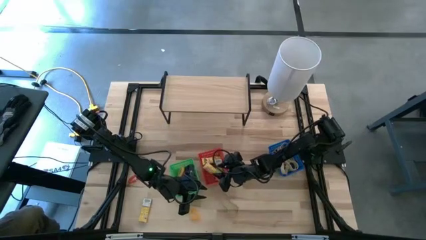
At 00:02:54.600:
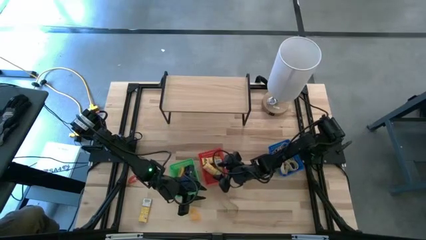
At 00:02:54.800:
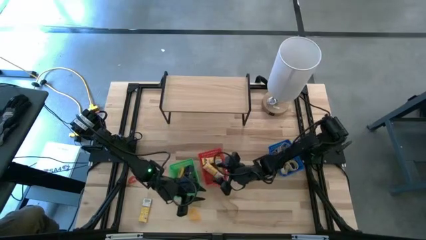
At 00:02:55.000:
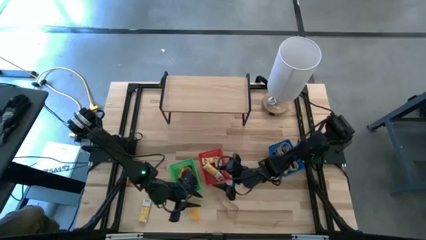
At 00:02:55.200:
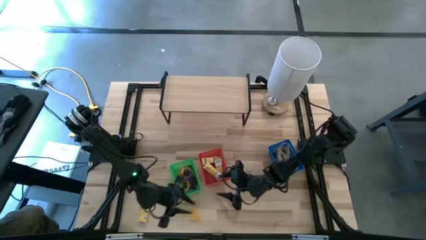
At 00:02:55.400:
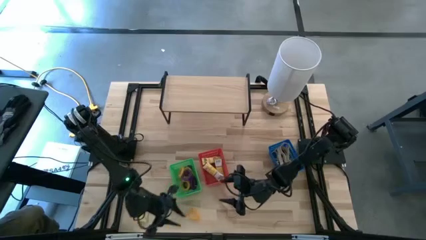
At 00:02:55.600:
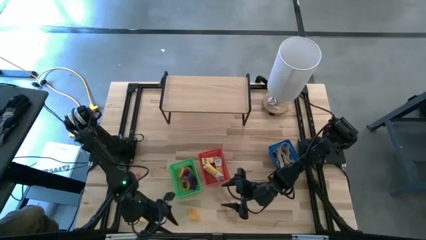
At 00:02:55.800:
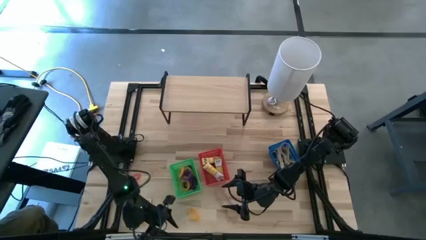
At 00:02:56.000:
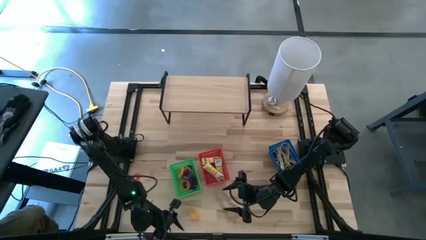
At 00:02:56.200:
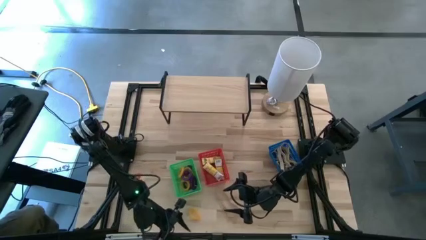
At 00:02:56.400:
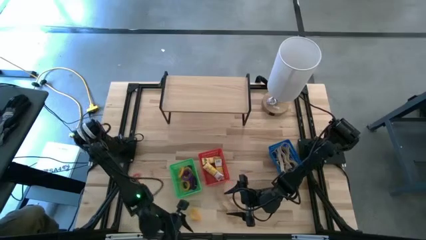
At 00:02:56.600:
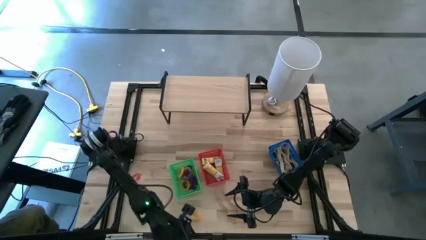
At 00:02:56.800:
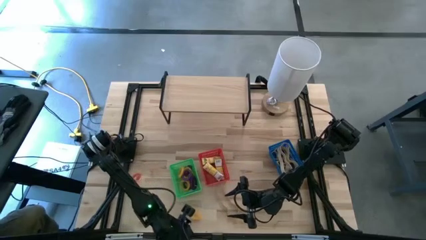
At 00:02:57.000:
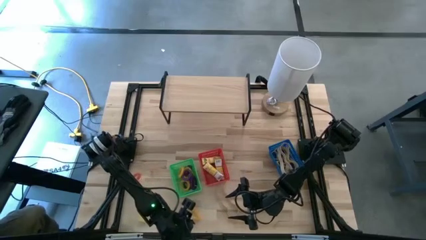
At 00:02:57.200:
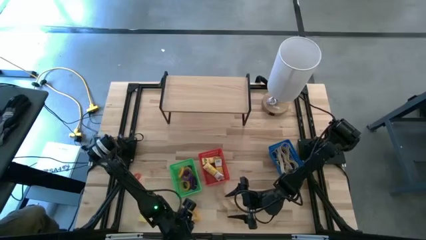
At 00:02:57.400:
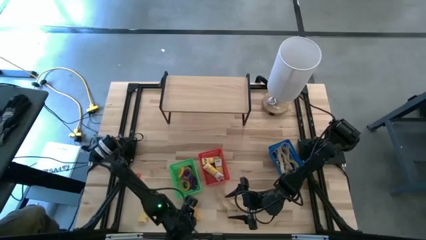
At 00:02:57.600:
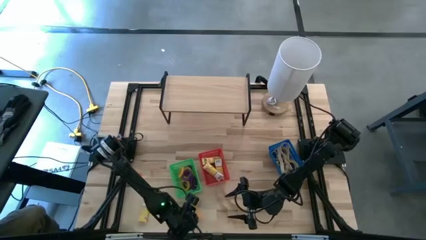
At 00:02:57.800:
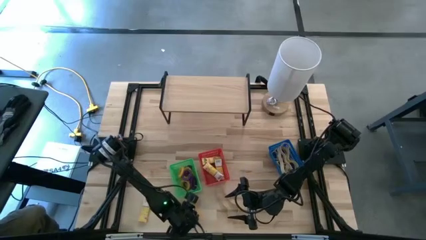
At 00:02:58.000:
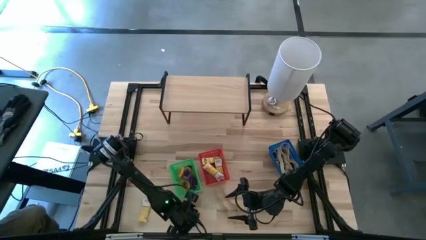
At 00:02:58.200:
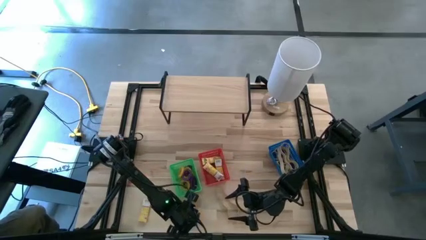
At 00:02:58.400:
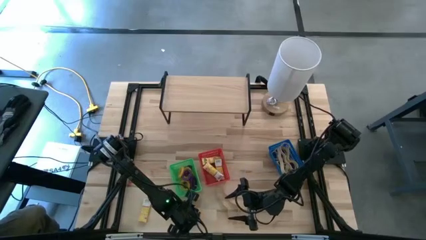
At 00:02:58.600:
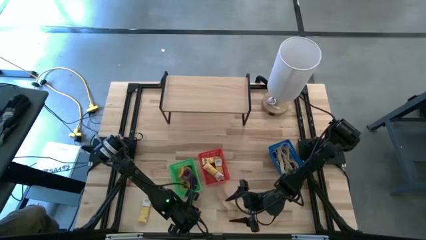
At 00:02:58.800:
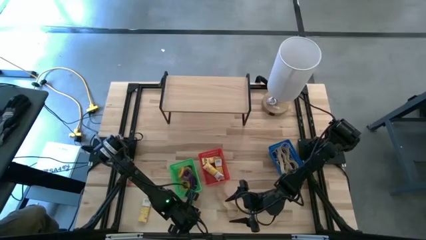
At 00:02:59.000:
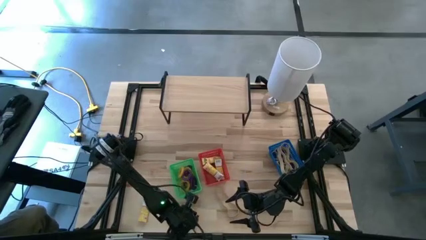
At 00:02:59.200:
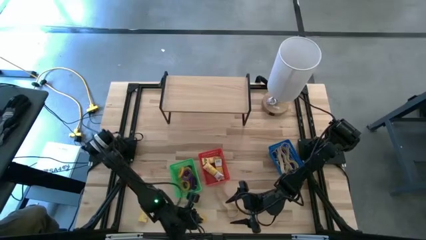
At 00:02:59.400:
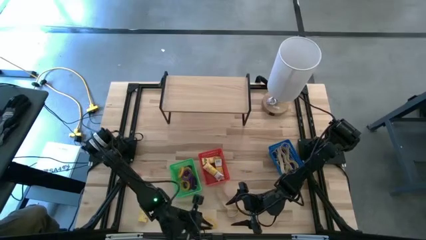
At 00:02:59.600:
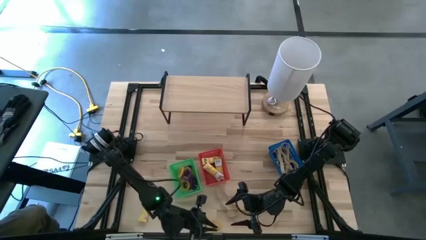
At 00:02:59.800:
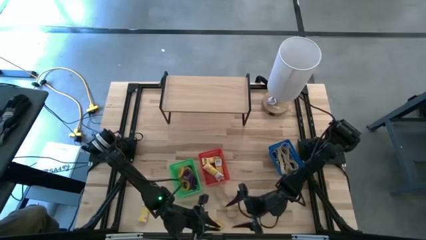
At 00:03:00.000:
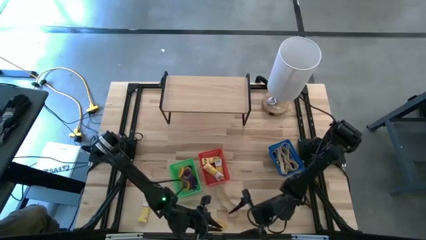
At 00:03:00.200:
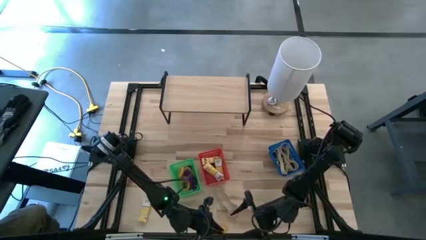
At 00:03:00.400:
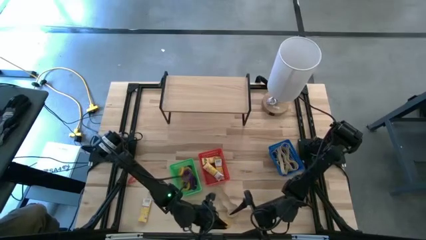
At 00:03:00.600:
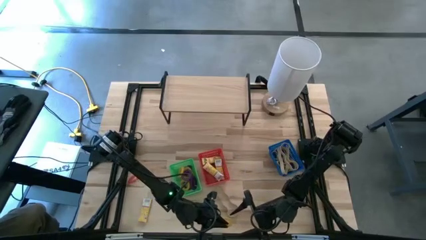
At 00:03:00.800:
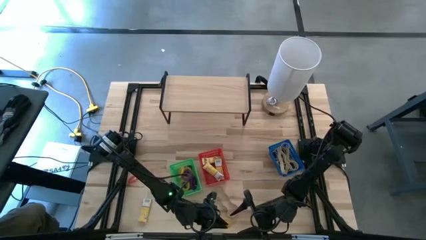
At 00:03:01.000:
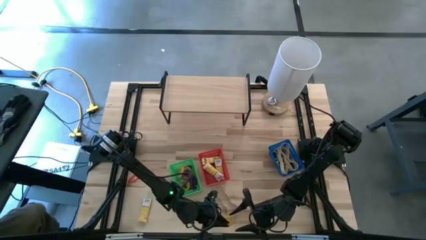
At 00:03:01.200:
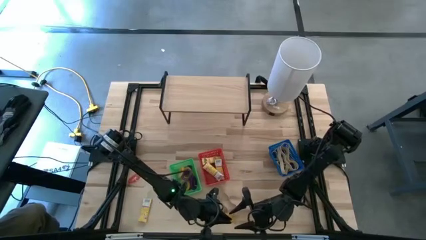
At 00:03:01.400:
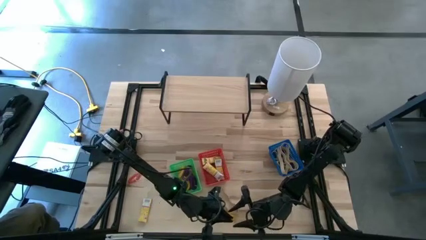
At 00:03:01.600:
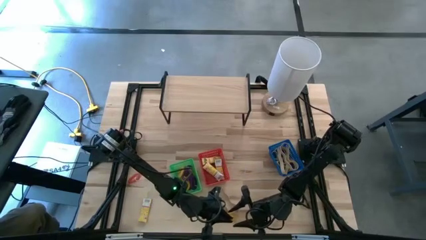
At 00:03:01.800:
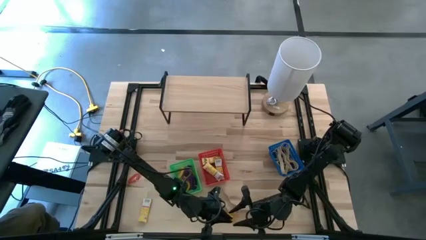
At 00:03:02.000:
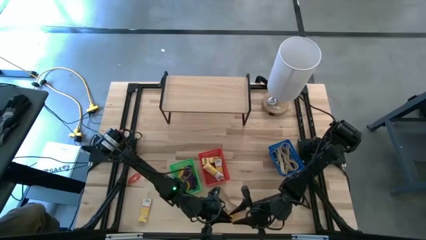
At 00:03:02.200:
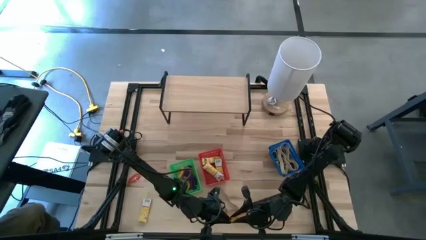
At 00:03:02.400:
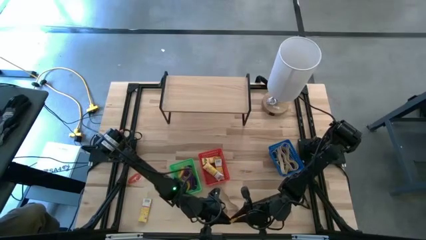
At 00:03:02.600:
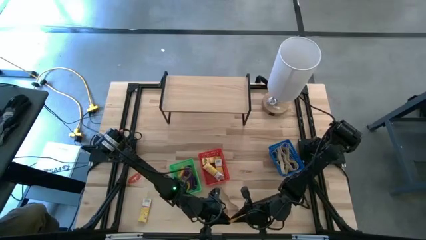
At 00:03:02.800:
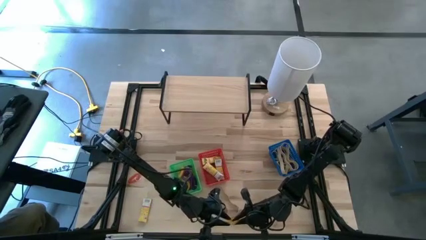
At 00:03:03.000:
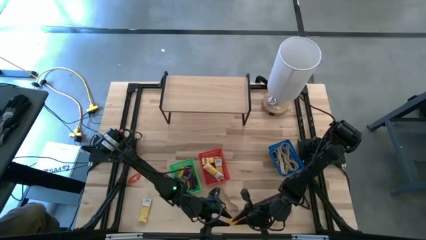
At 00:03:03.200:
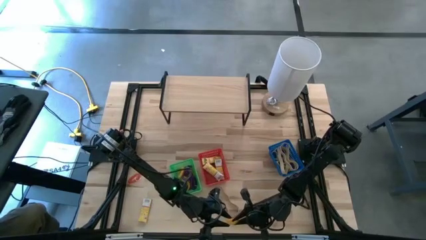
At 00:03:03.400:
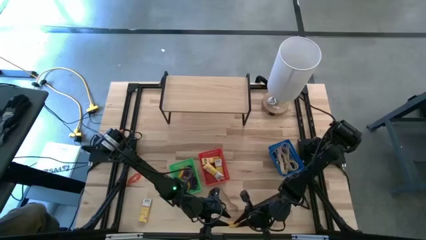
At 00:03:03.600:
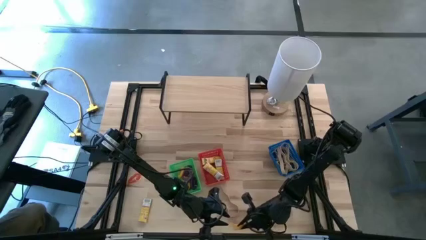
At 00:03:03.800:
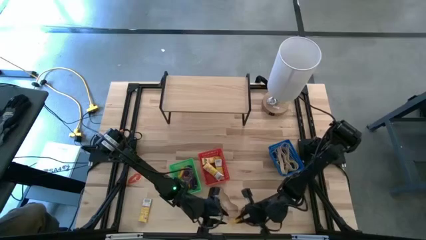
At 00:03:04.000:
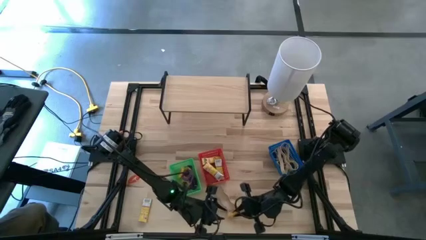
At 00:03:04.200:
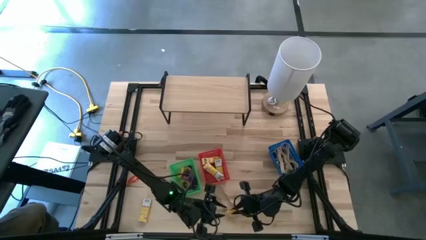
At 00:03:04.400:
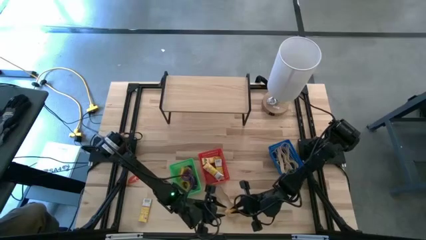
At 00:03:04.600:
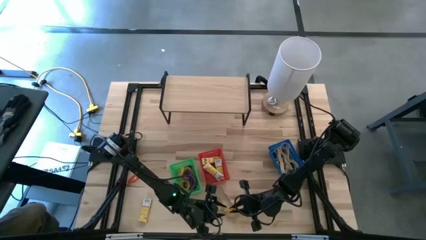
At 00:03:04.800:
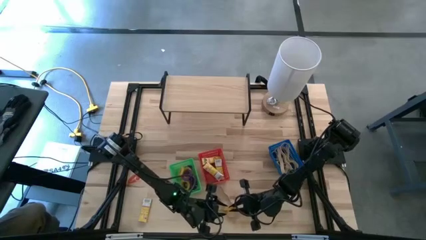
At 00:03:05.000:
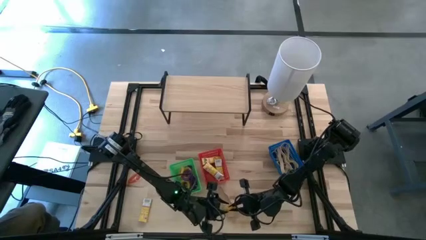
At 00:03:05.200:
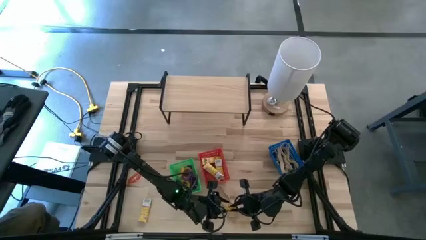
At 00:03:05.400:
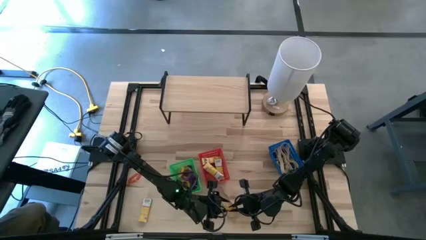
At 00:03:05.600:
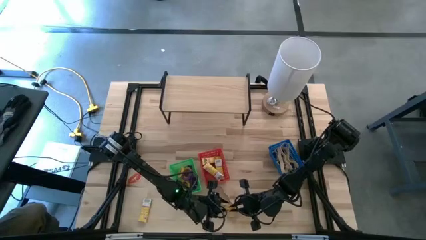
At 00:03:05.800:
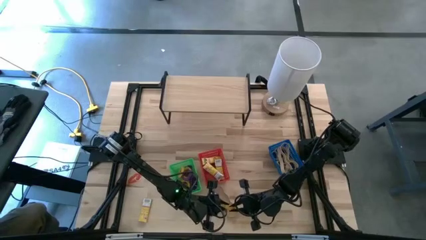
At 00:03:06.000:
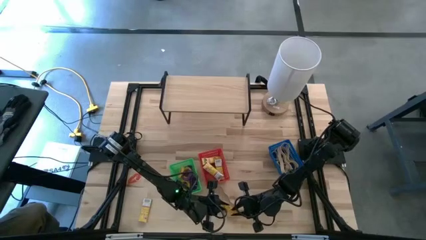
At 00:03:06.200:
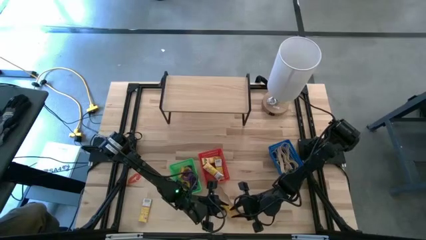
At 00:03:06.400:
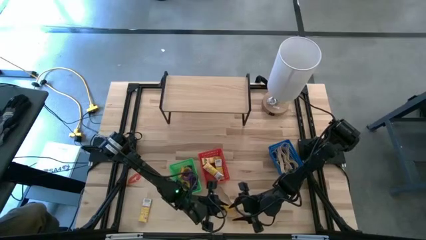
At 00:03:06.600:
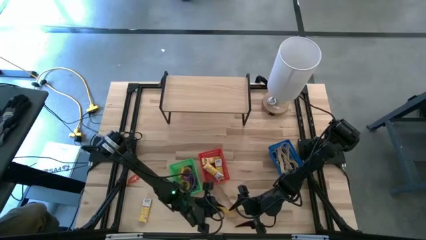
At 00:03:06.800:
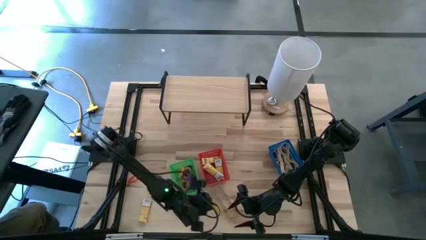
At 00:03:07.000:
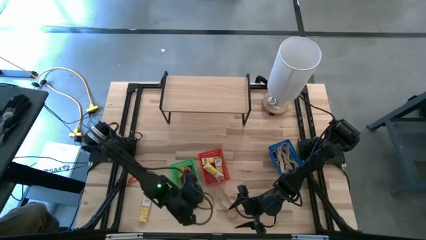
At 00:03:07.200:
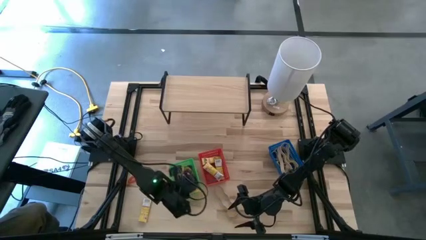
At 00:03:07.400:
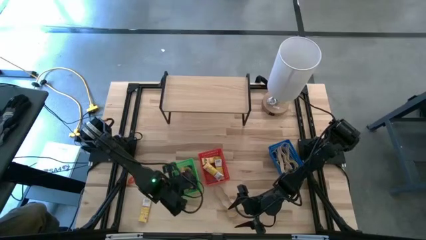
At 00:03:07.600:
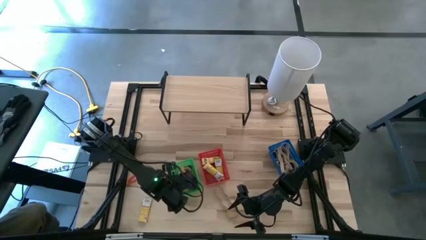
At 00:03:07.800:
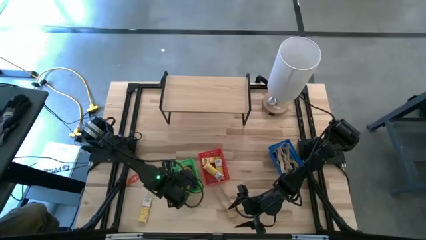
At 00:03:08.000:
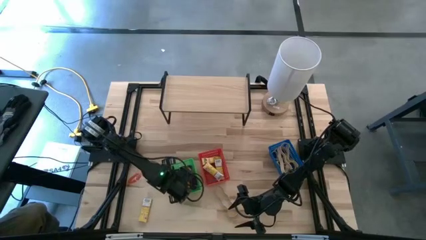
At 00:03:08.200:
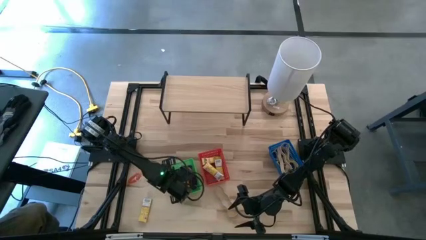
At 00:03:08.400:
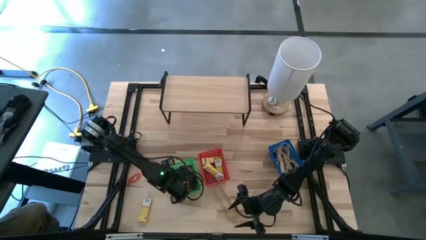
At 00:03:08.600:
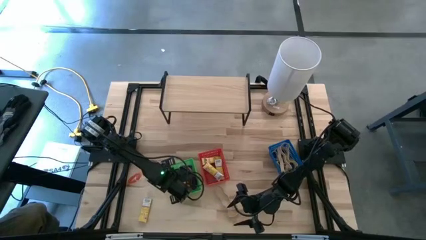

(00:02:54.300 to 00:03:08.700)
Task: Pick & Place Office Desk Supplies
Put the yellow spring keychain into the green bin
